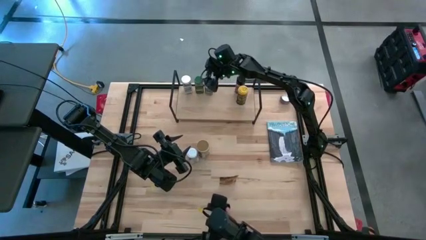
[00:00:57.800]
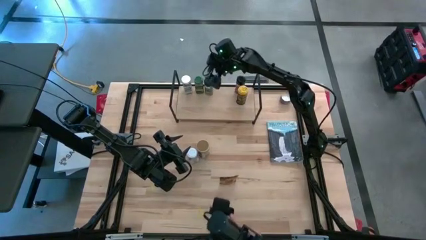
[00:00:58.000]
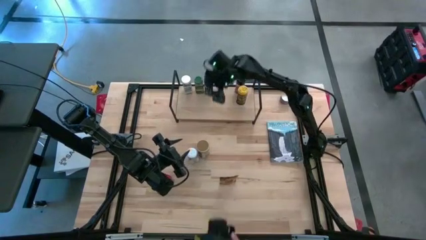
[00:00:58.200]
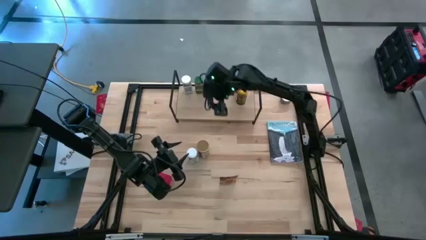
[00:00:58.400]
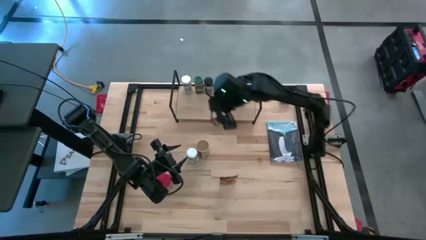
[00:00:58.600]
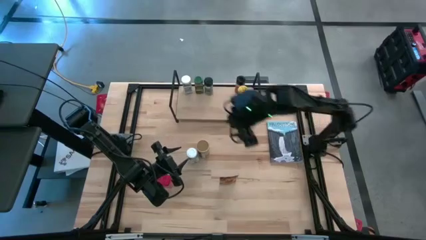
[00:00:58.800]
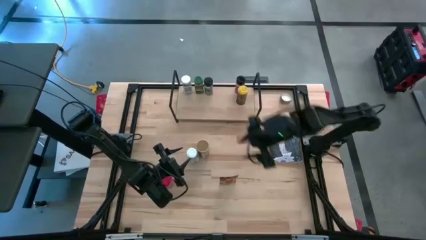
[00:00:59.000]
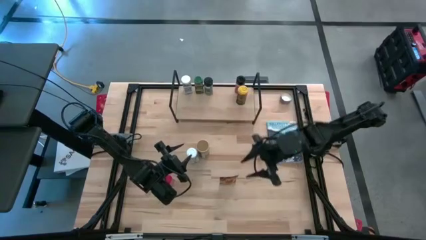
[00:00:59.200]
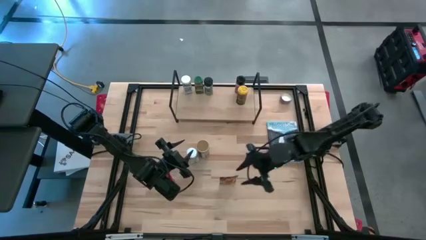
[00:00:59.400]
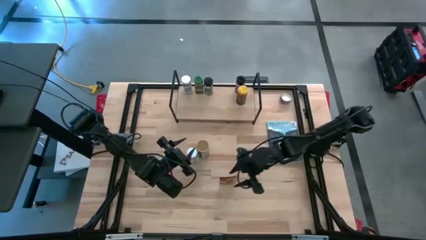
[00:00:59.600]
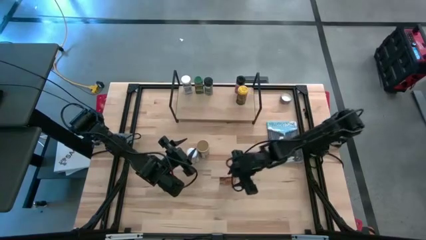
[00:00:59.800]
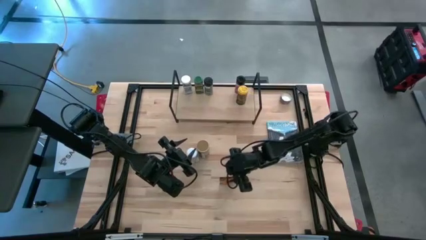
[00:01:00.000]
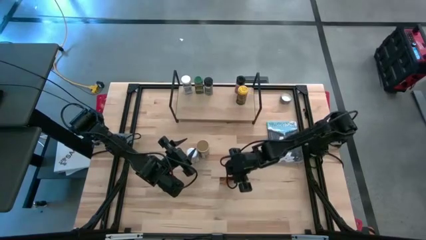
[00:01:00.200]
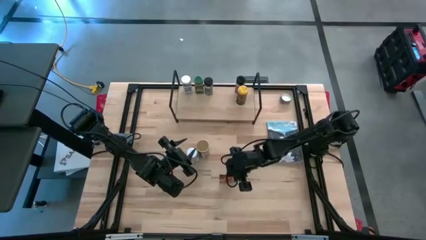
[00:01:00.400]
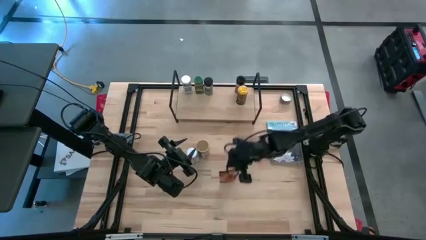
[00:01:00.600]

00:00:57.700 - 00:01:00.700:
Task: Shelf spices
Put the orange seasoning pack on the shelf

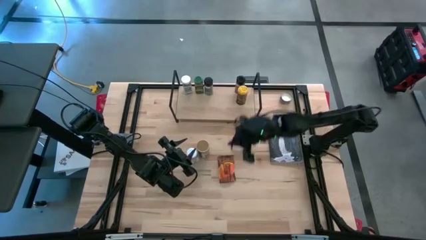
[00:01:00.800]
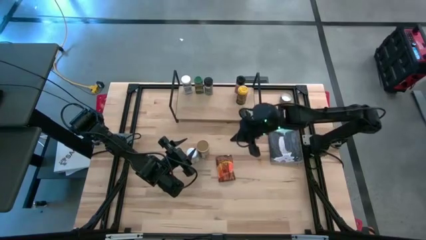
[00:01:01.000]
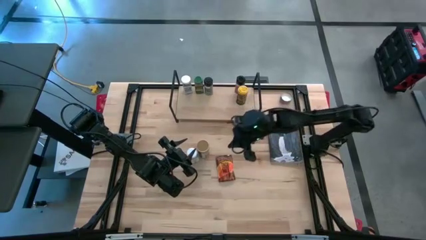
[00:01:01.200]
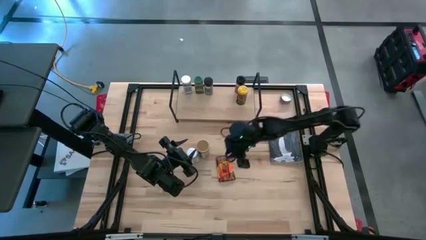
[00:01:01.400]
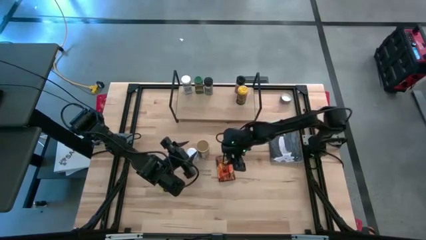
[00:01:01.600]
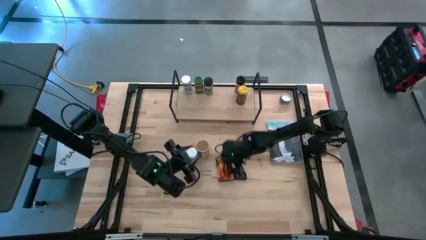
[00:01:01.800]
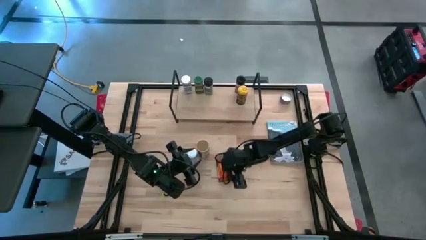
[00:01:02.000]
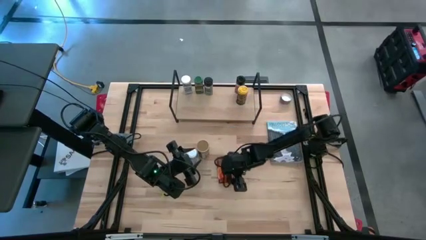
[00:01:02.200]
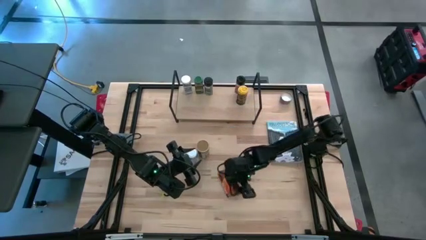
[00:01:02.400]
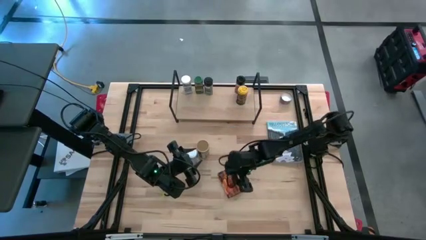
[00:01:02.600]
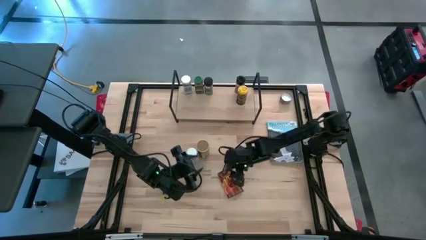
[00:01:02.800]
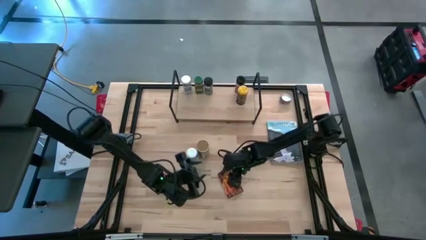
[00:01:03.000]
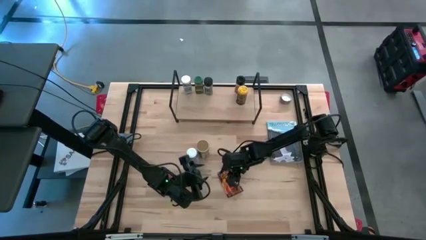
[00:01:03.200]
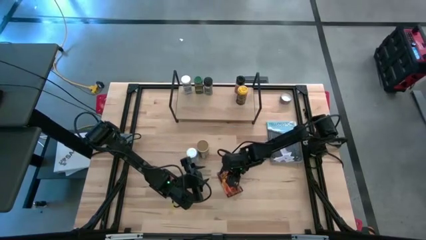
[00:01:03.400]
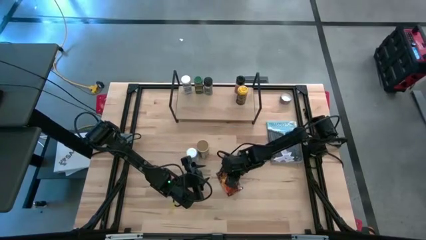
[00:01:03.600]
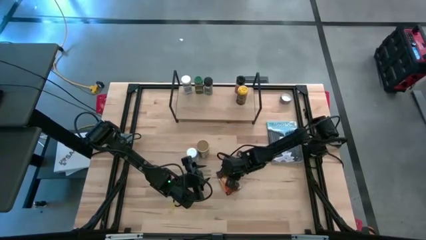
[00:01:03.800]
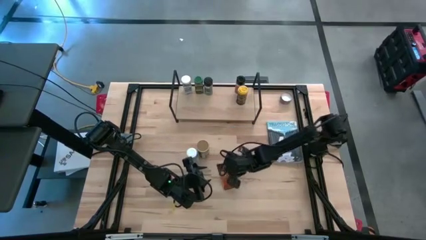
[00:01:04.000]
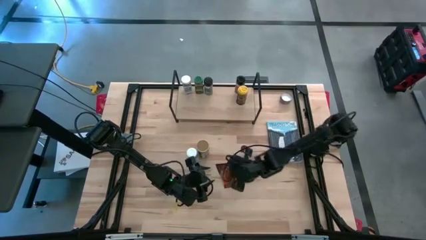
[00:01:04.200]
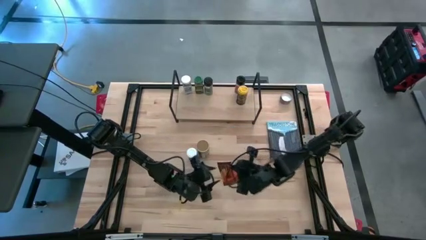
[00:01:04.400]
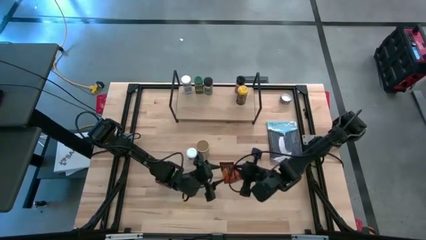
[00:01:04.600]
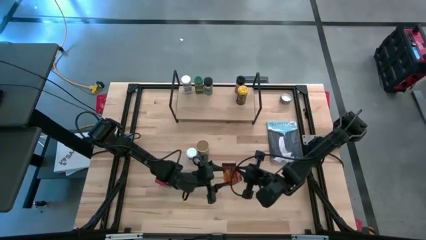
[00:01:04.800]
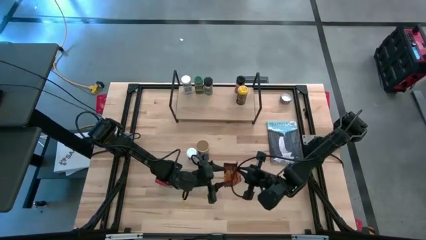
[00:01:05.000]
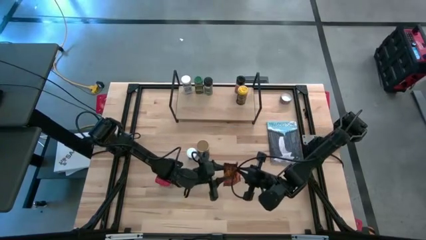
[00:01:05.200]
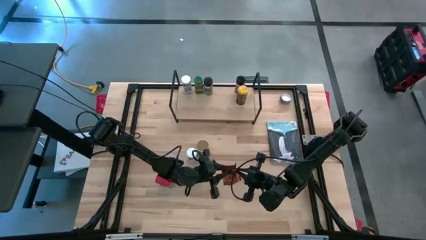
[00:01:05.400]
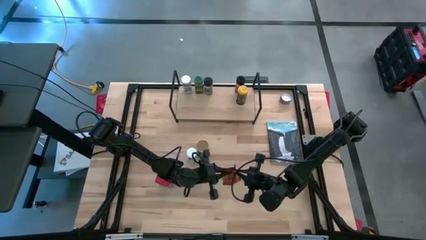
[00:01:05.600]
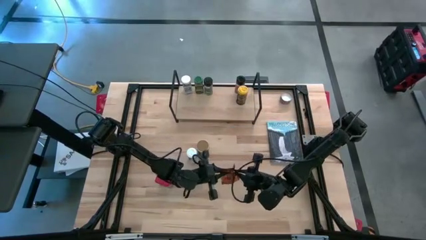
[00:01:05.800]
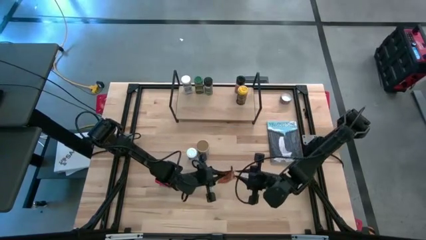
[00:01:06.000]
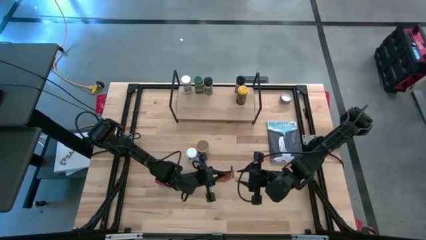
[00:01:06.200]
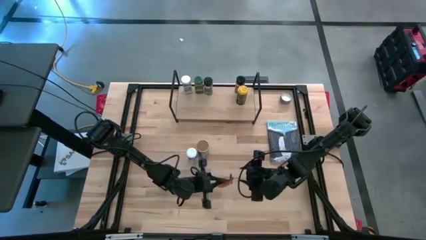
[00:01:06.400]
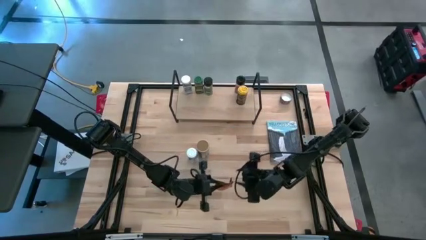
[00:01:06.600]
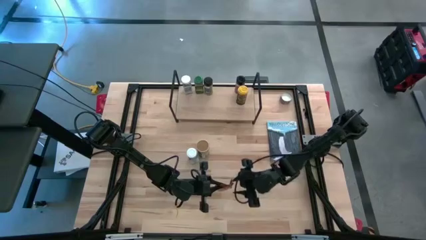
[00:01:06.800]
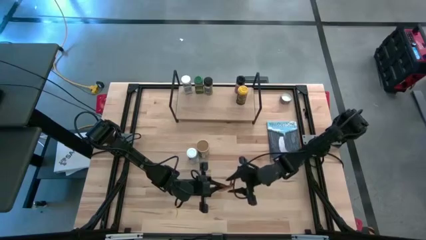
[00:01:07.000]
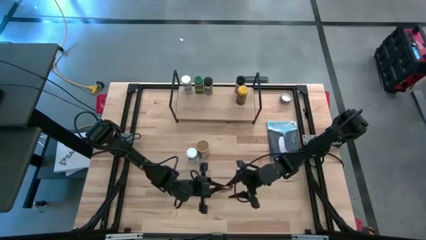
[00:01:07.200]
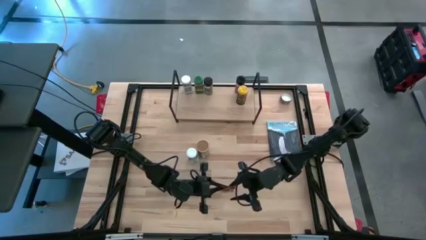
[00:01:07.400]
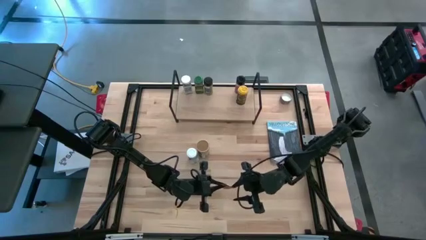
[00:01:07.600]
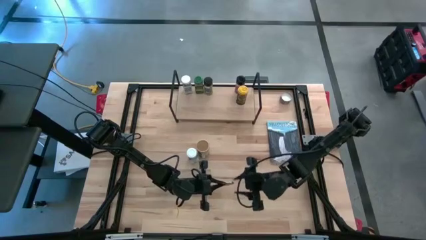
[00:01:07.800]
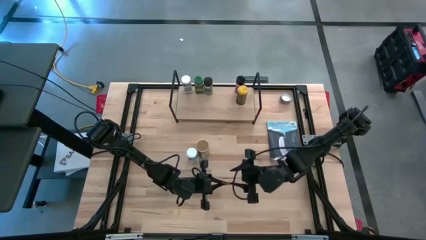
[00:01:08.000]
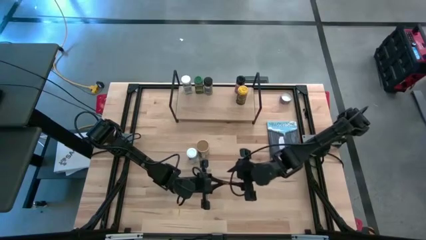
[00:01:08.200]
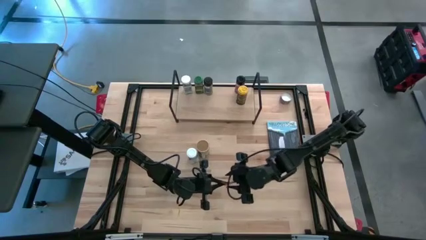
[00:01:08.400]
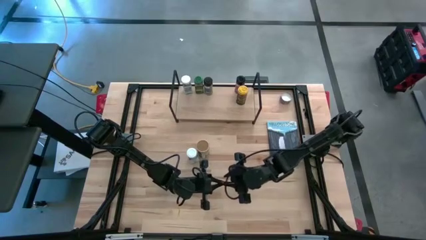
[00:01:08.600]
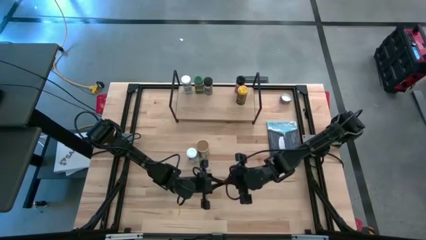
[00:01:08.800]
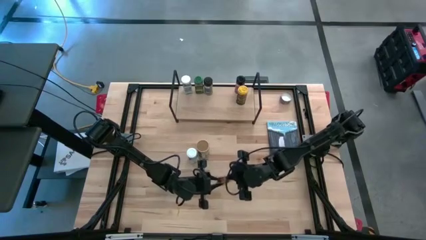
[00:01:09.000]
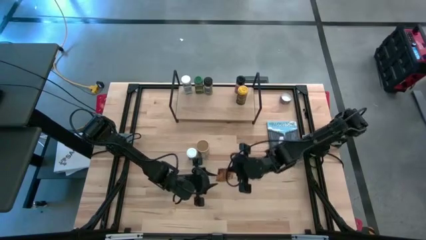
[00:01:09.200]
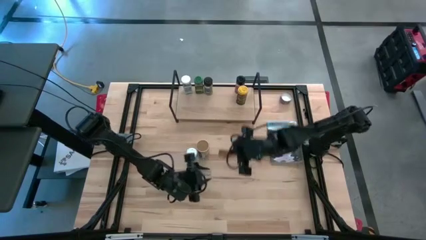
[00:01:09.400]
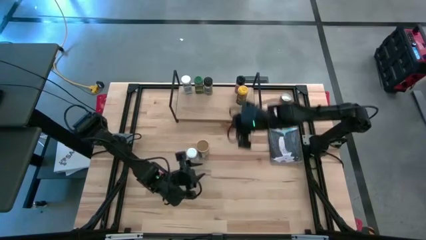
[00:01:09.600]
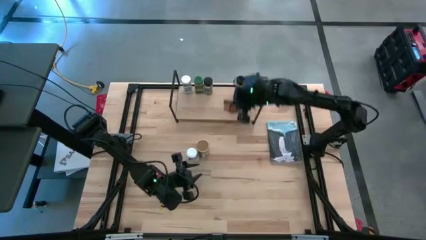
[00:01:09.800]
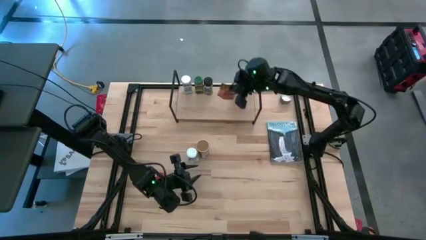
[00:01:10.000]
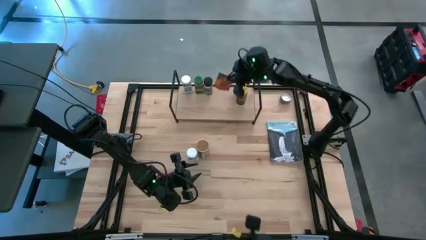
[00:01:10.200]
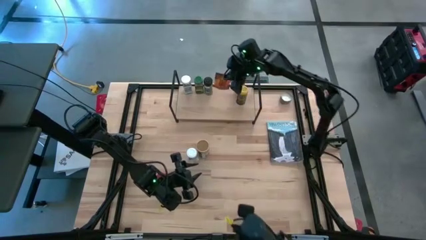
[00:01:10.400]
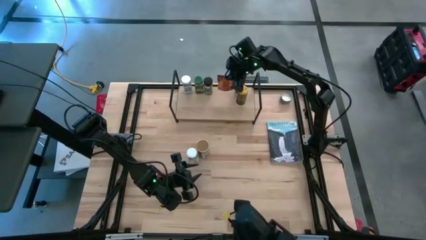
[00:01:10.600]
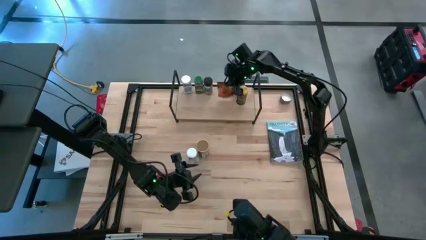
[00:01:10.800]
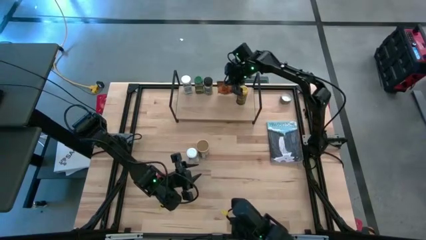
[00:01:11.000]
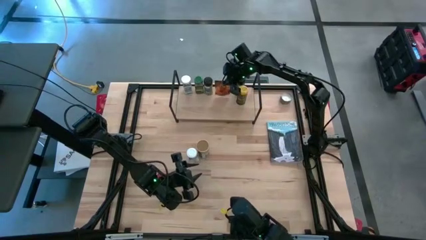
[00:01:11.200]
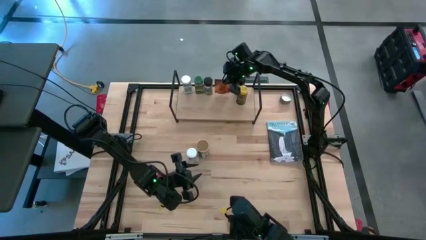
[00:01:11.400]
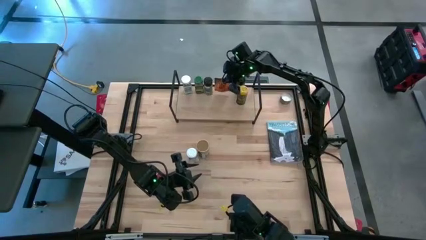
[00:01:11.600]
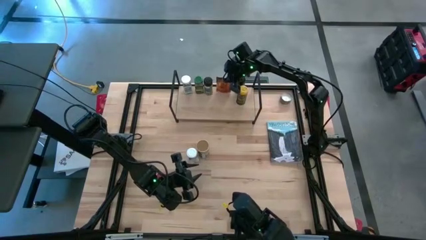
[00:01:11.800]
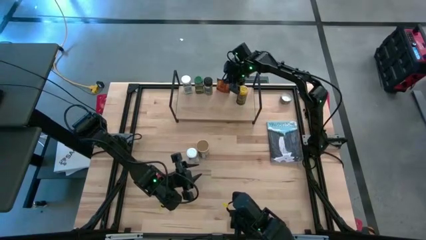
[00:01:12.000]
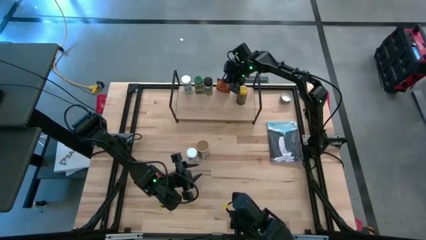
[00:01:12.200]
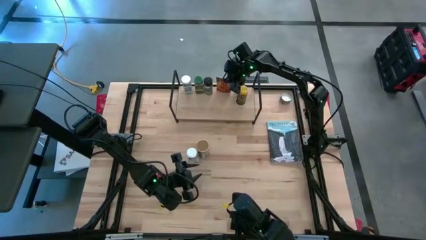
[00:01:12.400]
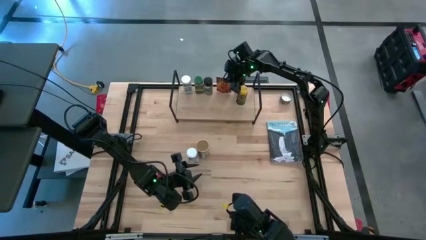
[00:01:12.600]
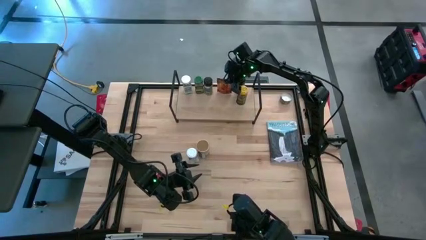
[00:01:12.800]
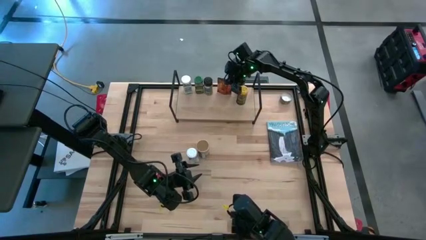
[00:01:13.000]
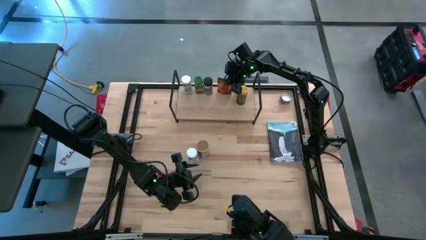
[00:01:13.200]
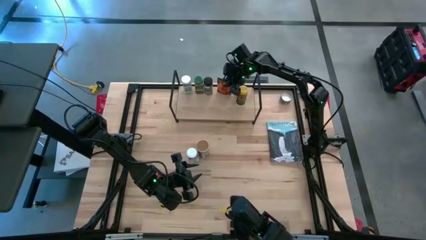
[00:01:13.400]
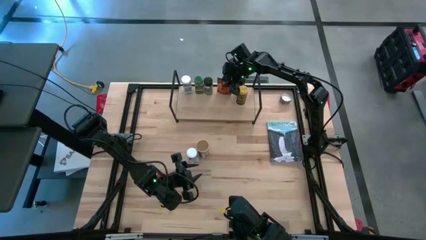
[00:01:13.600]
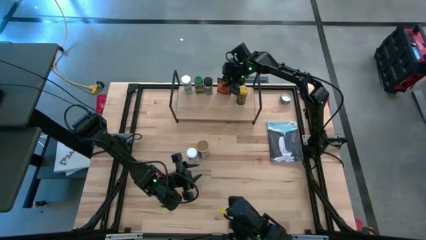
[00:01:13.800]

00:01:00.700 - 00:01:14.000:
Put the orange seasoning pack on the shelf
